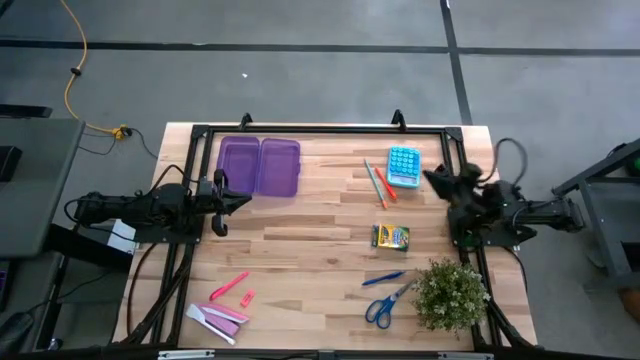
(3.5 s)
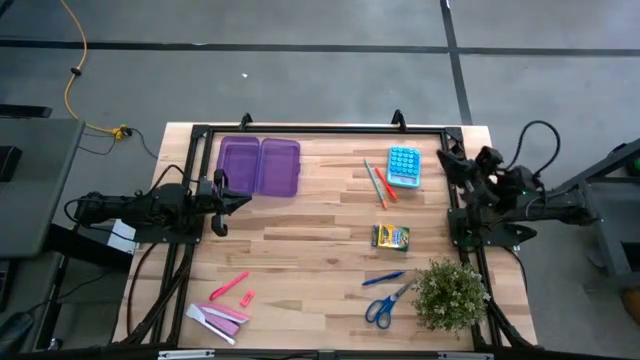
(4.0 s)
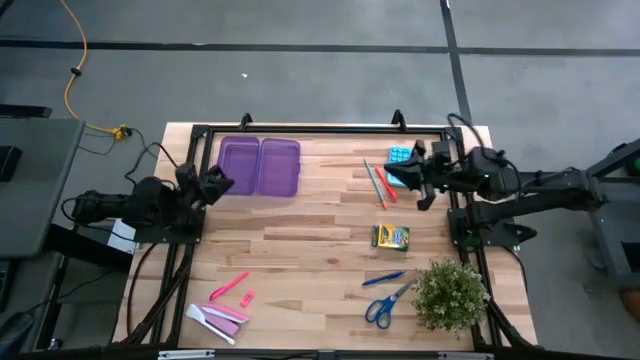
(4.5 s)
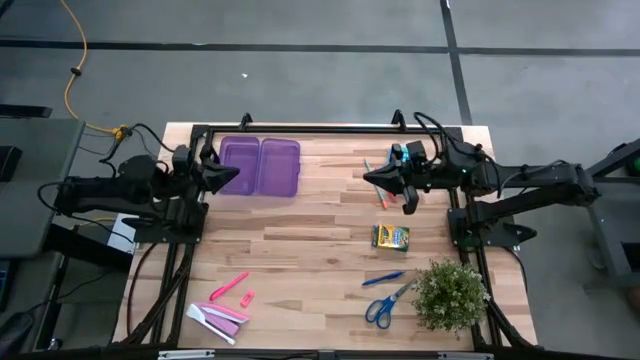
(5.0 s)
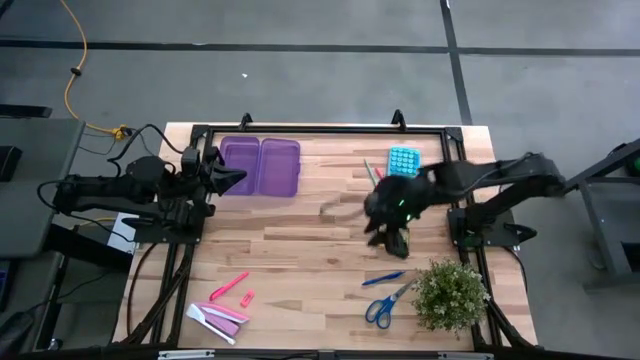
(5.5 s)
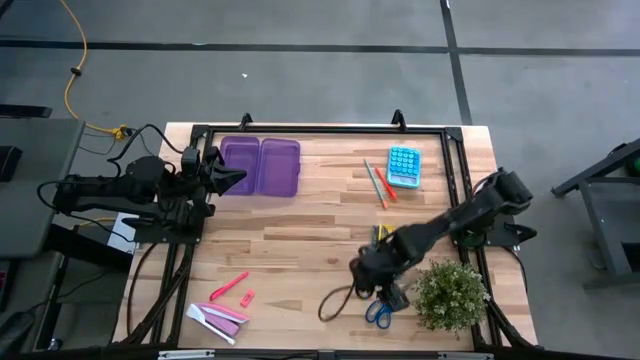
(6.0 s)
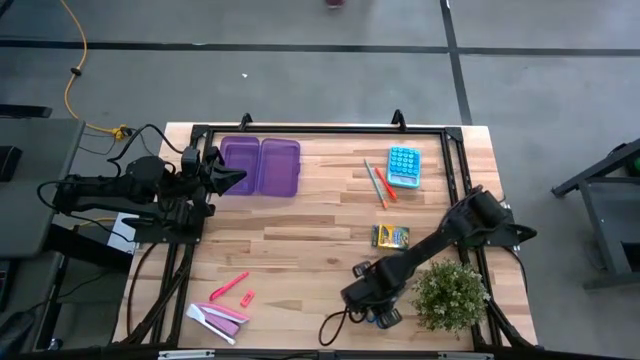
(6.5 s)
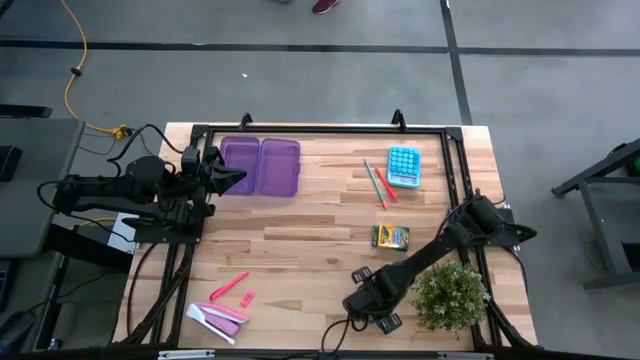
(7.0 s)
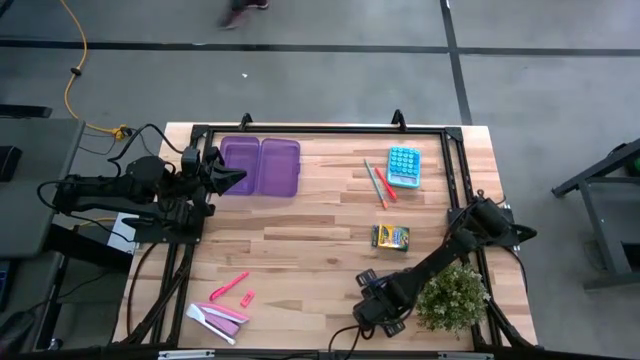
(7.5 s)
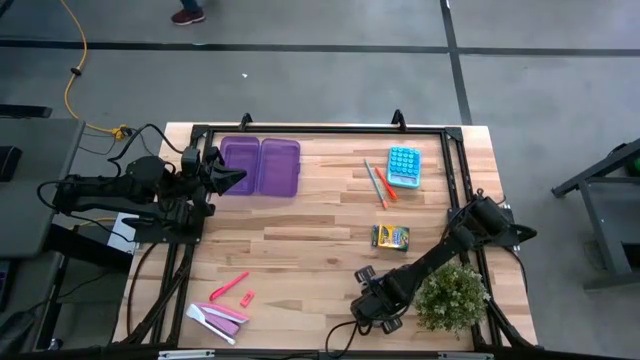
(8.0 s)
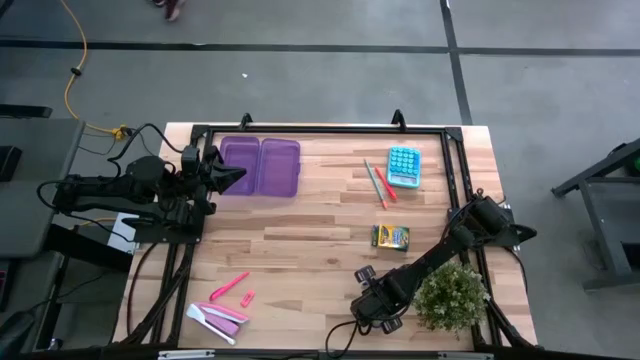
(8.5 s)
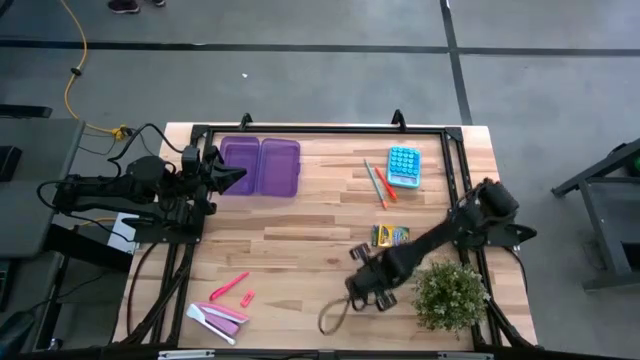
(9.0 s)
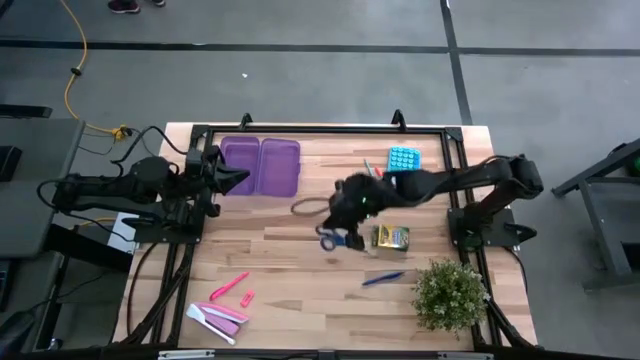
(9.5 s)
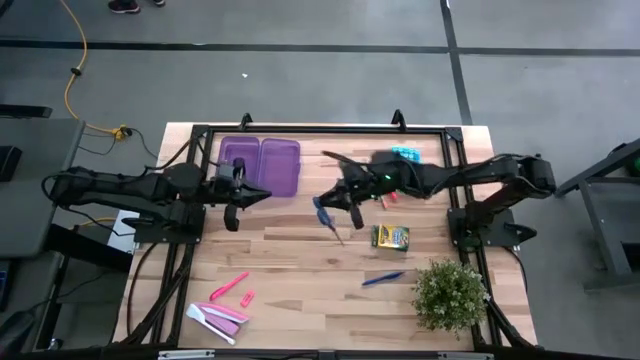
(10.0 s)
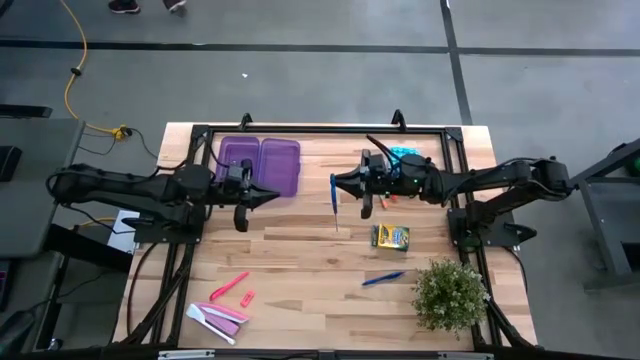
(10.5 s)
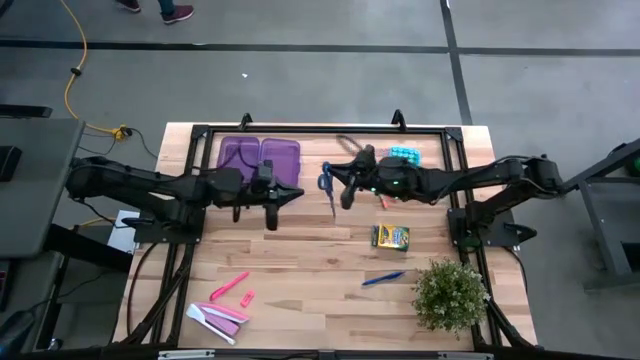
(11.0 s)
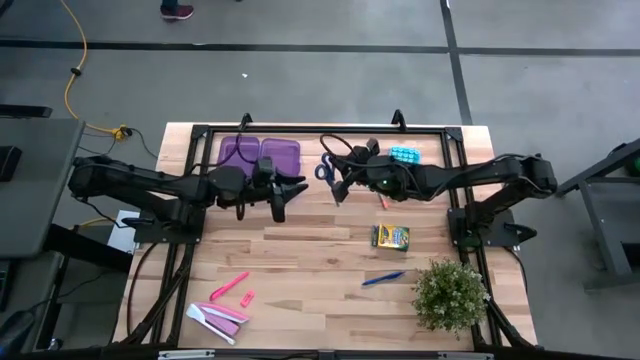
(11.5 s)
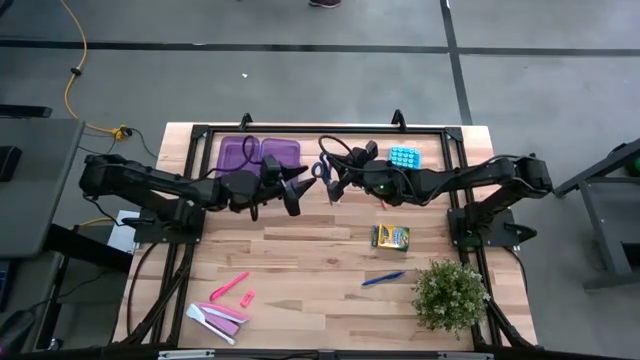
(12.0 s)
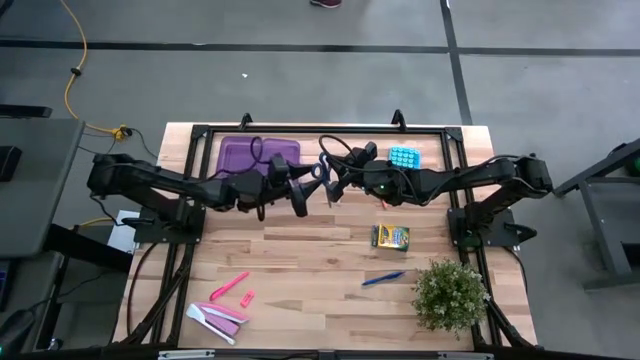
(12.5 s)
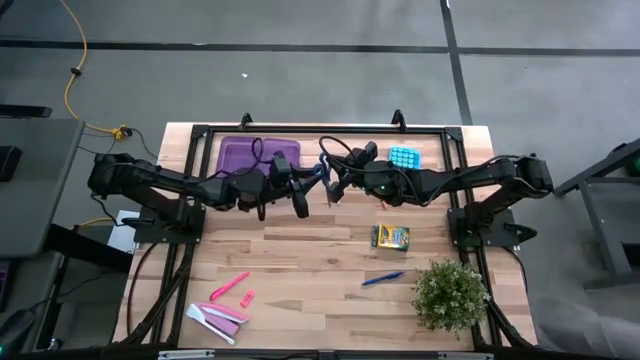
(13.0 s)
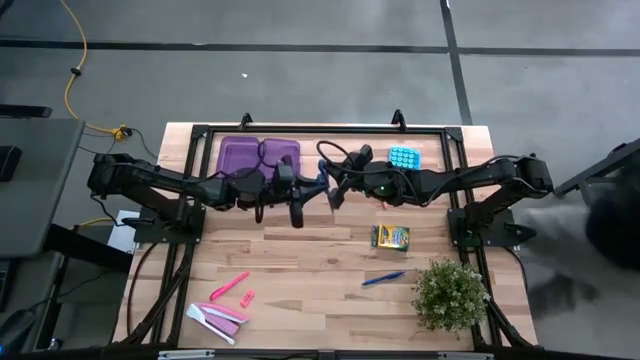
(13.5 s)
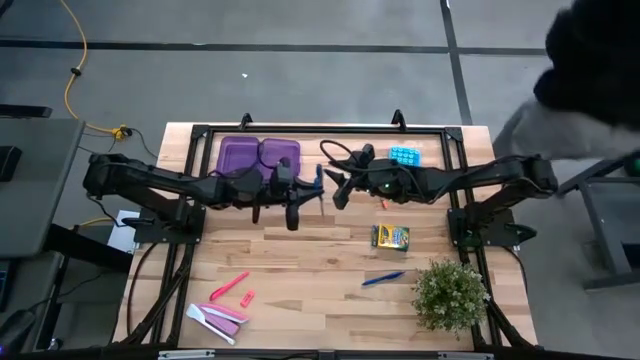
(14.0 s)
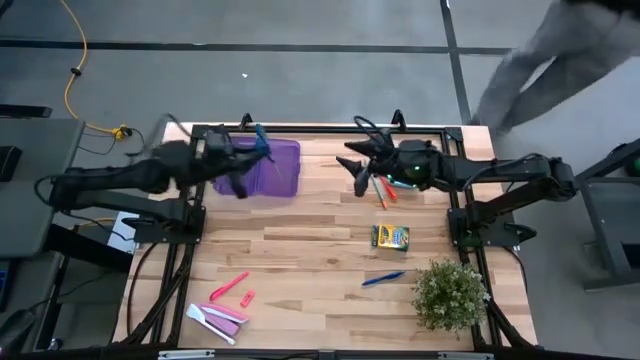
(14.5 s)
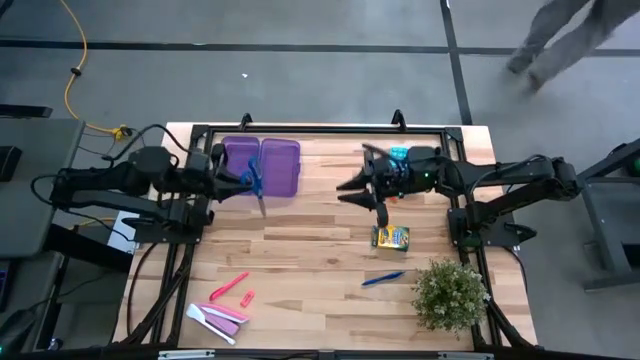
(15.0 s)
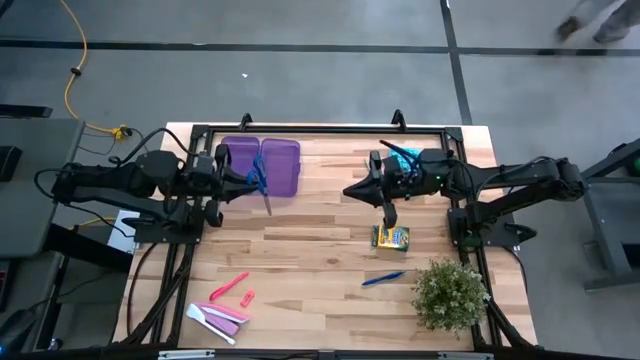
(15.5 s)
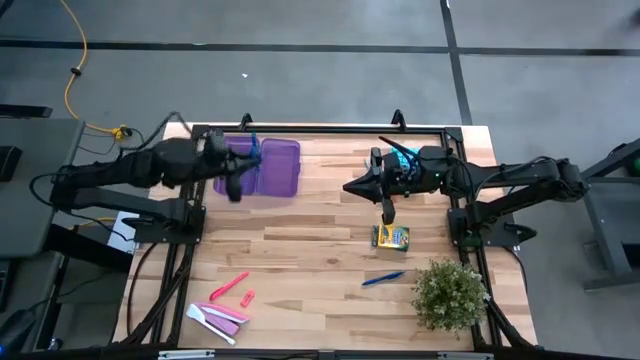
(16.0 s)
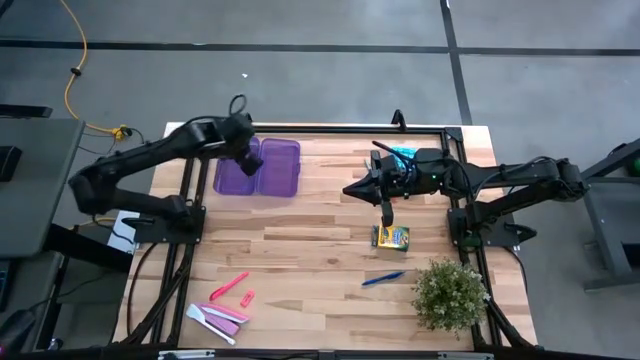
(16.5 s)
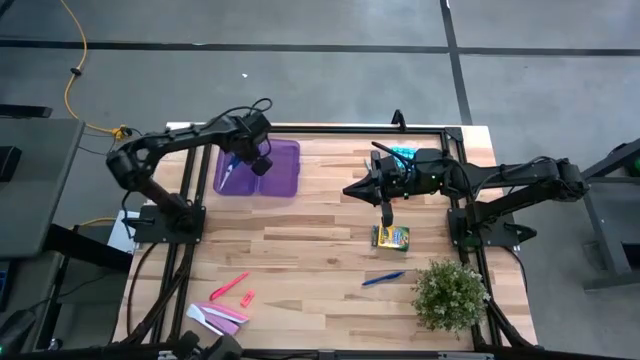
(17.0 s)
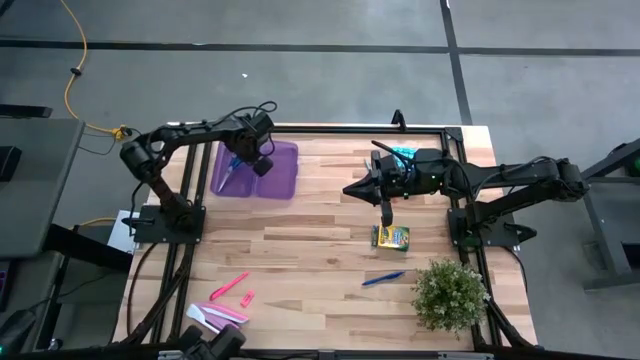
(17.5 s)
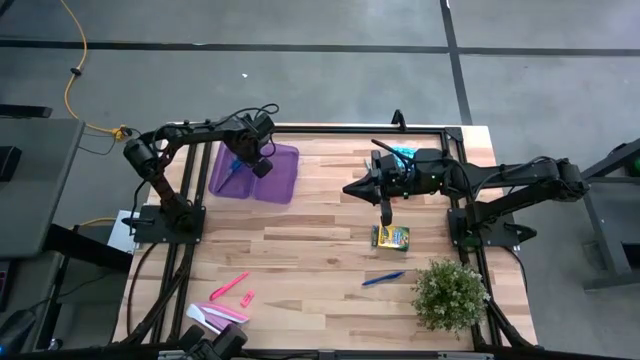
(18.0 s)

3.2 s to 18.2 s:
Task: Pack school essentials
Put the blue scissors into the purple supply box

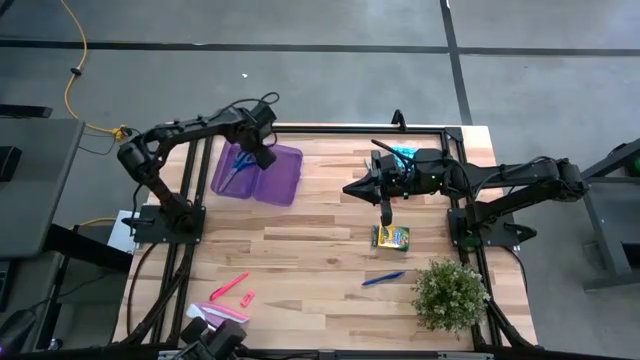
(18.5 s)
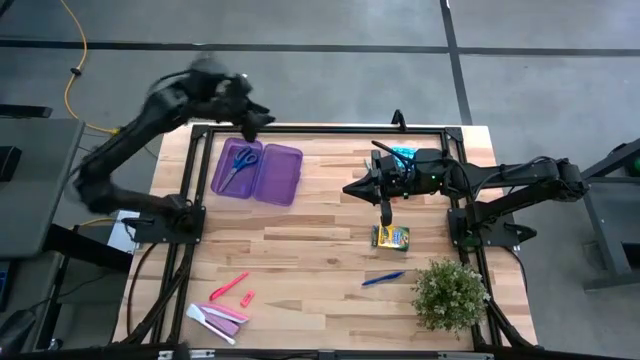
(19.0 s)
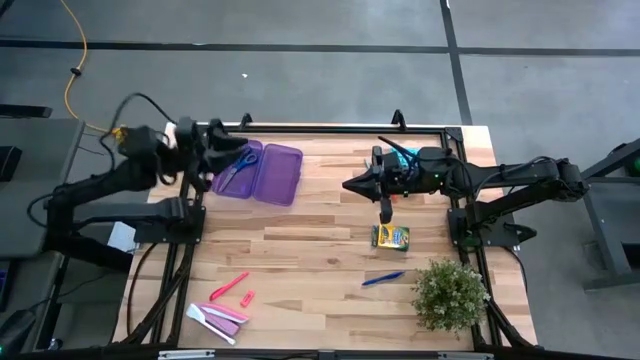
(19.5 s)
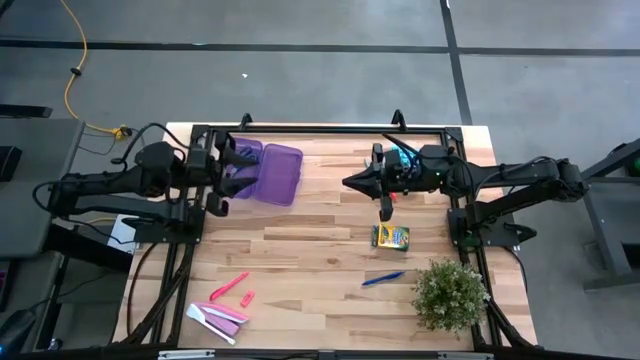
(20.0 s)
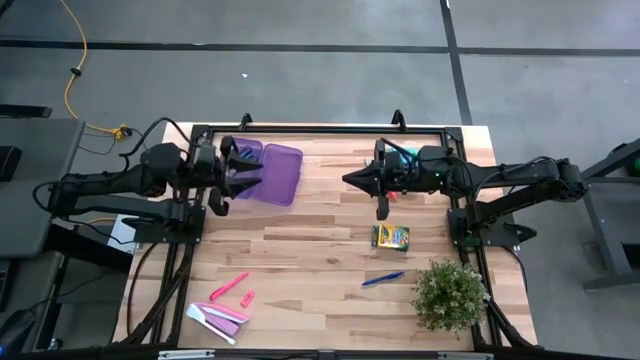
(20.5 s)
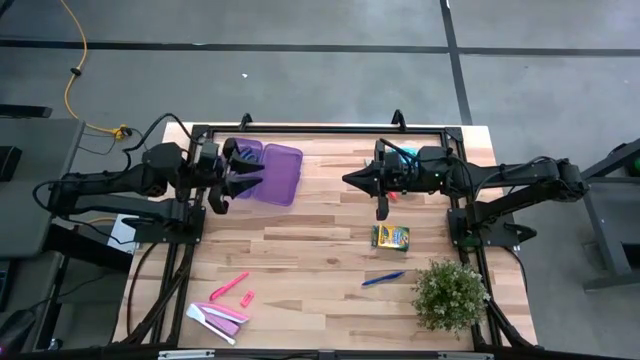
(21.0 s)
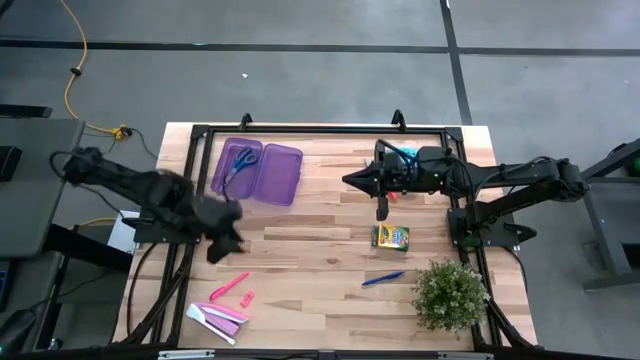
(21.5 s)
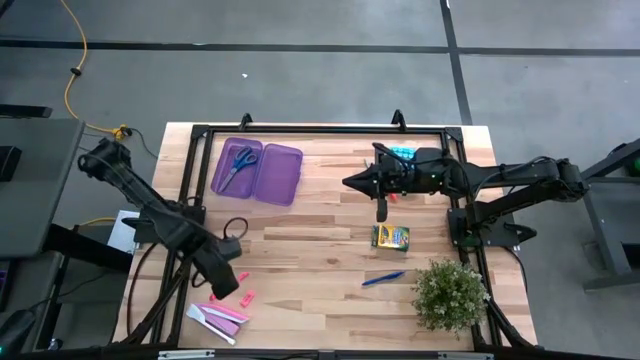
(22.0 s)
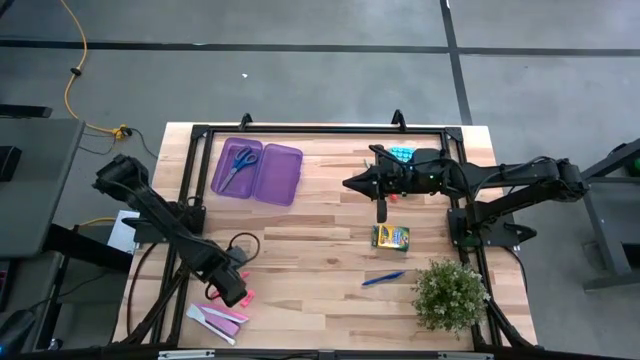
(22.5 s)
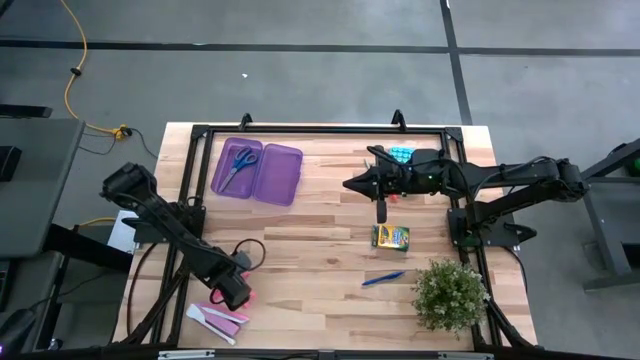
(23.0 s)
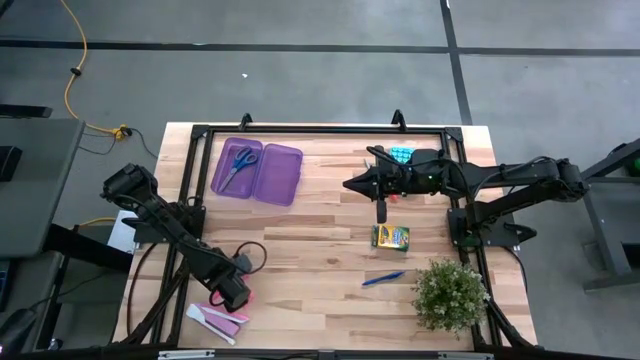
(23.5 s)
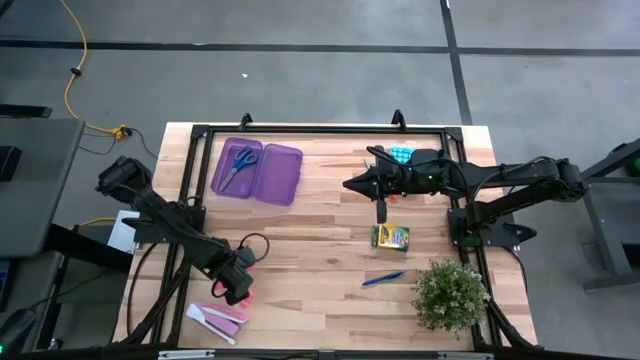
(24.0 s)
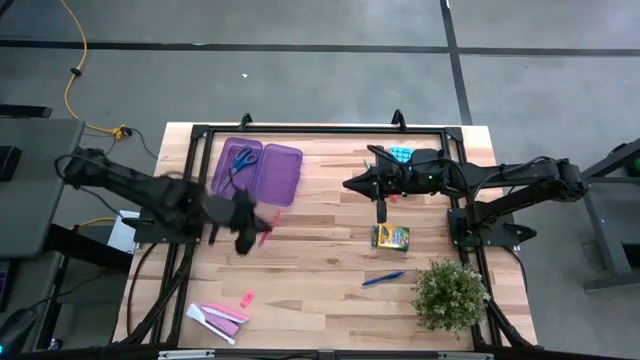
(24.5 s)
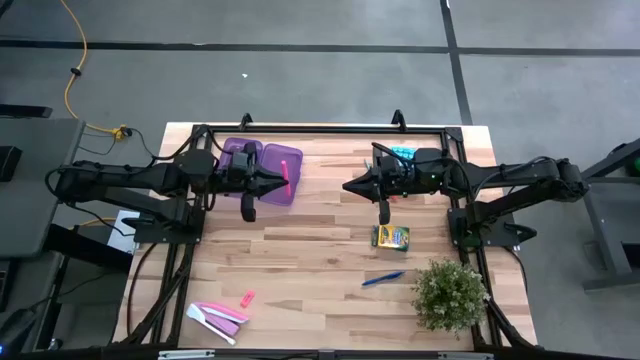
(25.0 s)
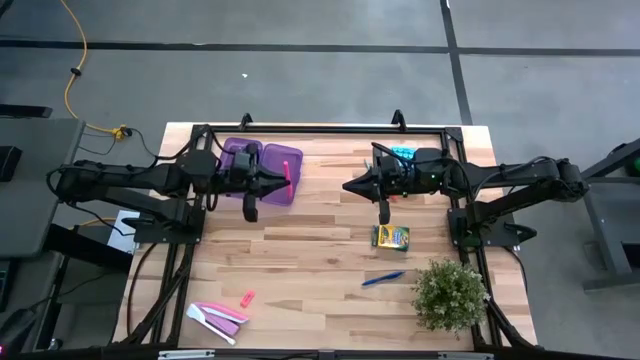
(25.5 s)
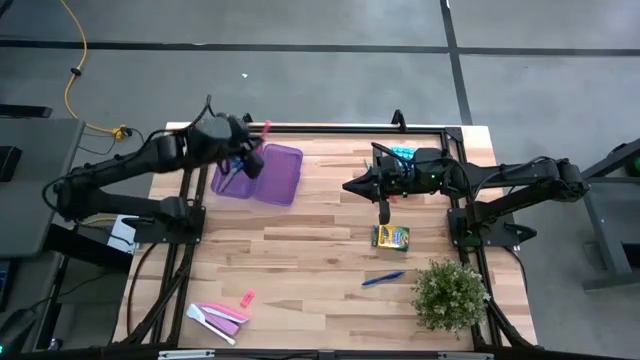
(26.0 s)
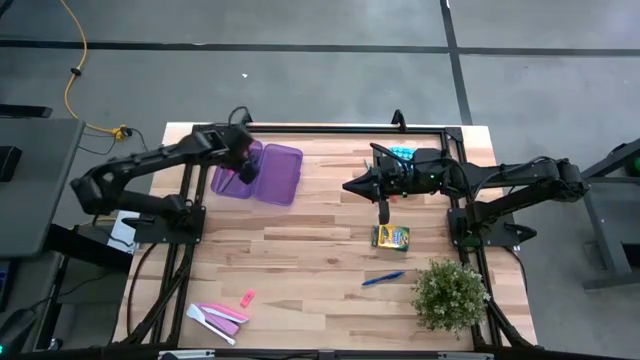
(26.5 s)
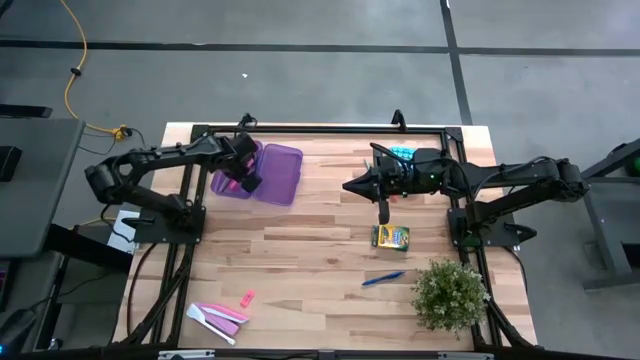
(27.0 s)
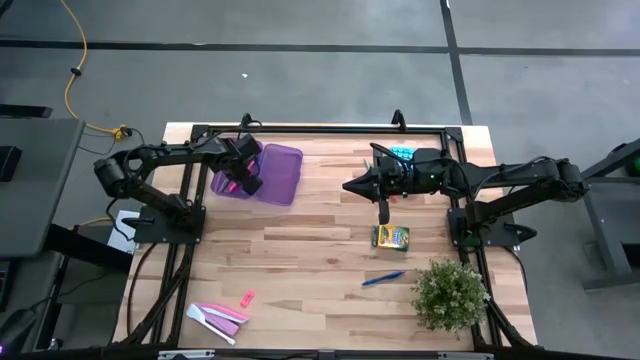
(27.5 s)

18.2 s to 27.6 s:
Put the pink pen into the purple supply box
